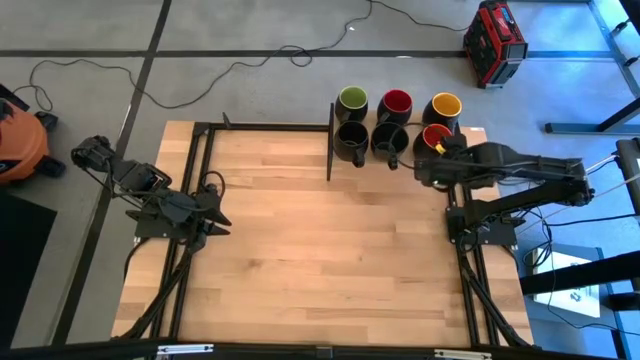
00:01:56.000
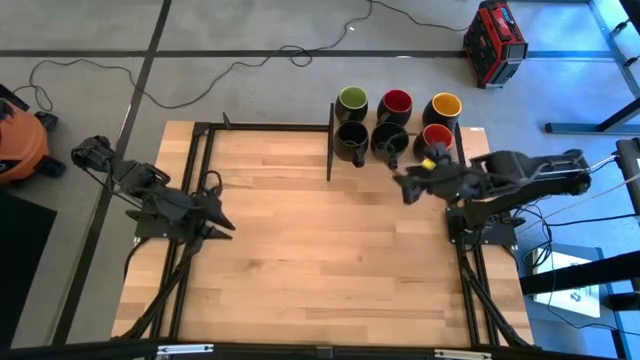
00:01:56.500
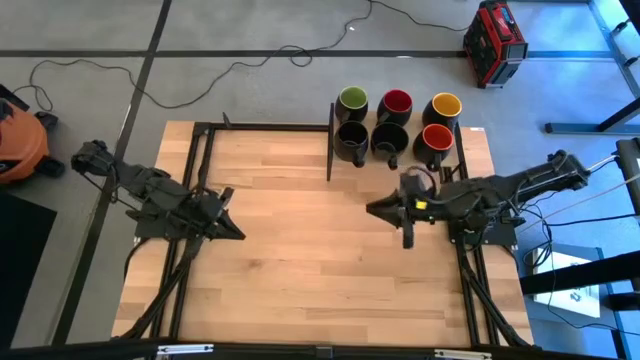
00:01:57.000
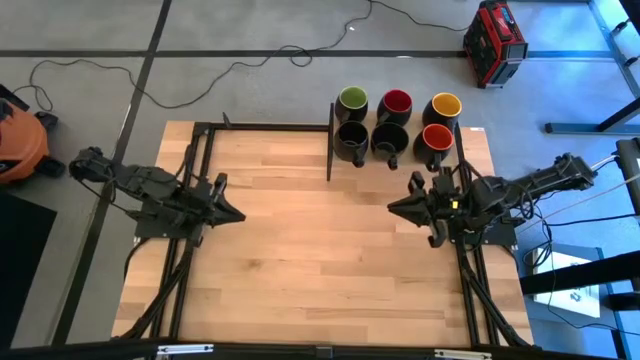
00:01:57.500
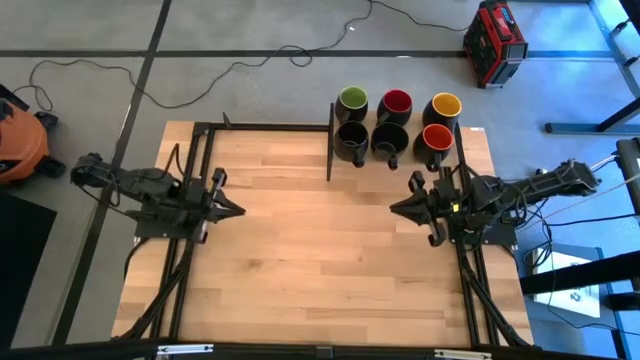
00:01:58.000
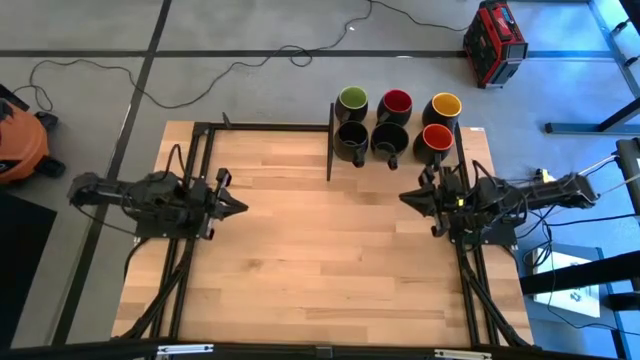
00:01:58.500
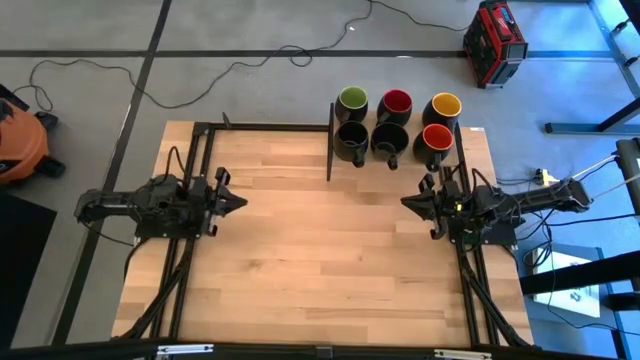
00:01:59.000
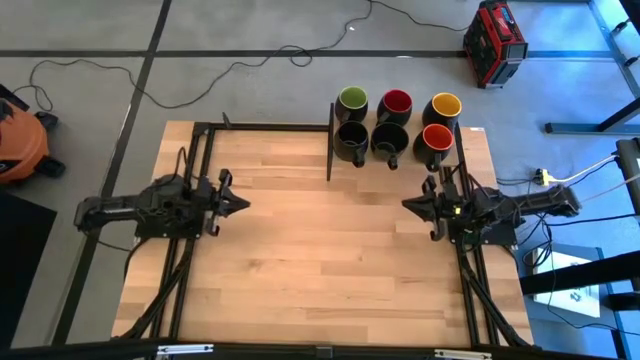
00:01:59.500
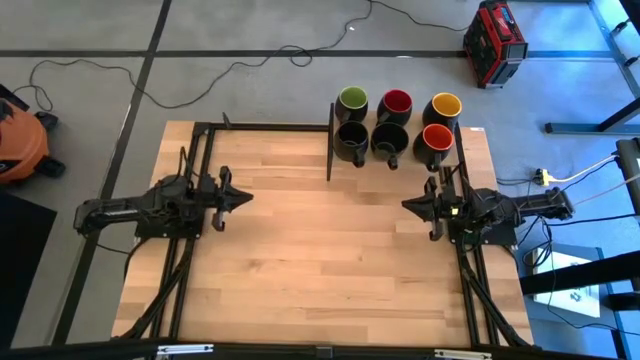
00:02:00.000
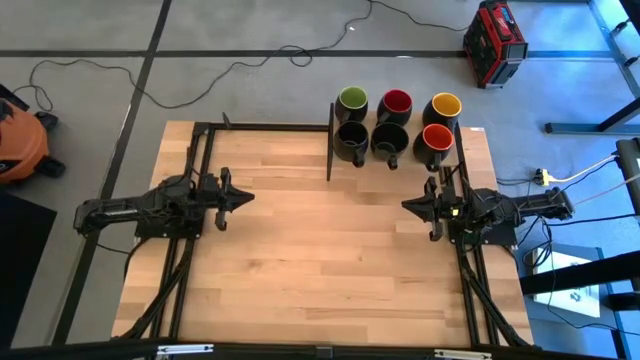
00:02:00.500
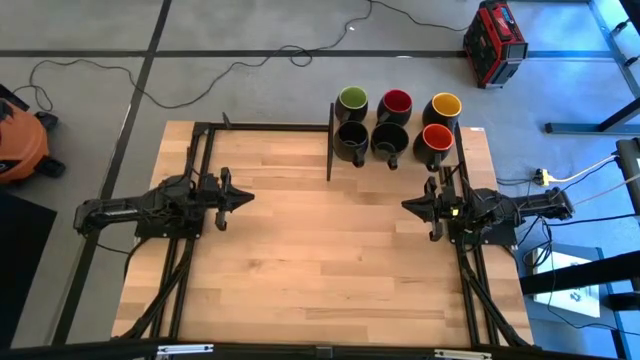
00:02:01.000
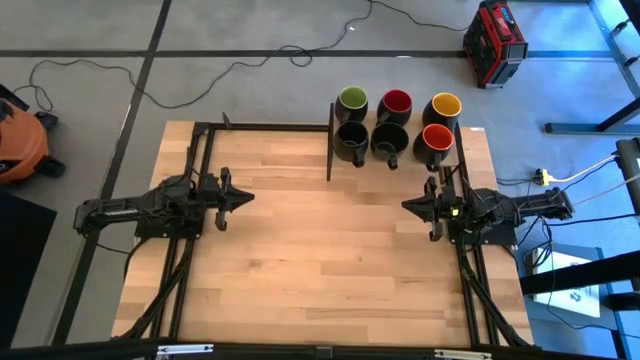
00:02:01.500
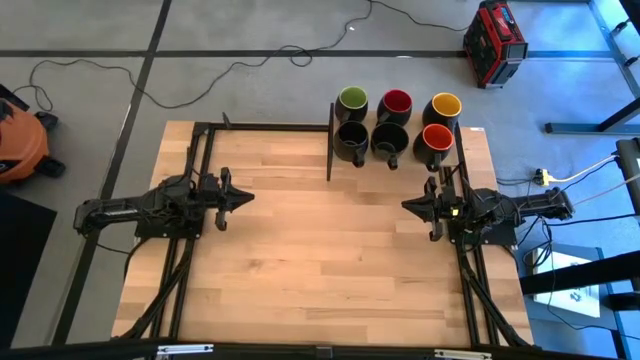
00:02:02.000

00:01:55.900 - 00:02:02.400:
Task: Place coffee mugs
Return to Home Position

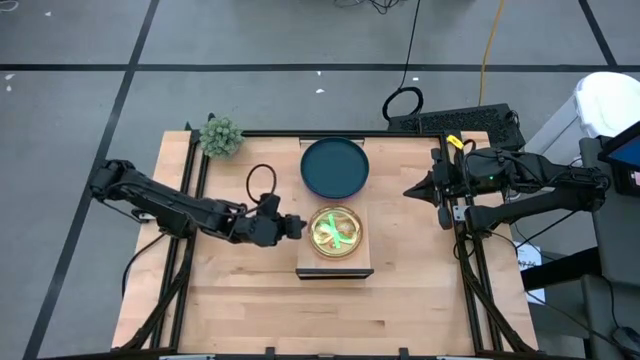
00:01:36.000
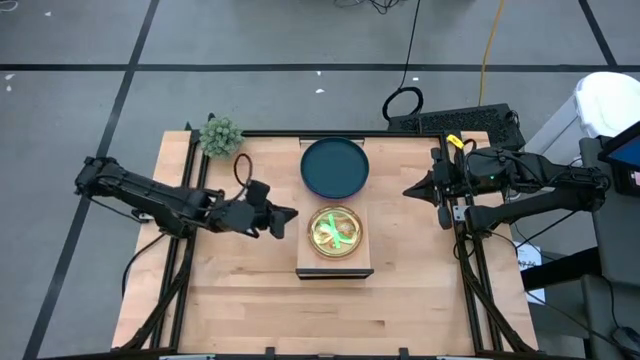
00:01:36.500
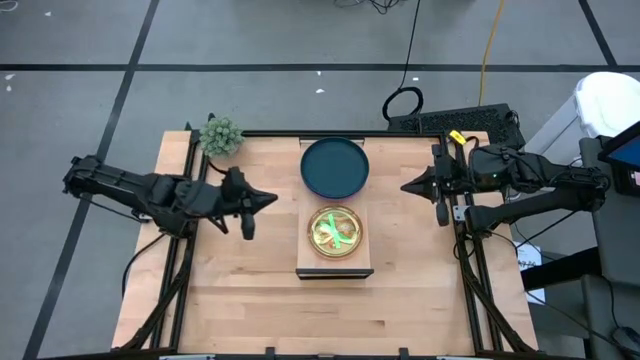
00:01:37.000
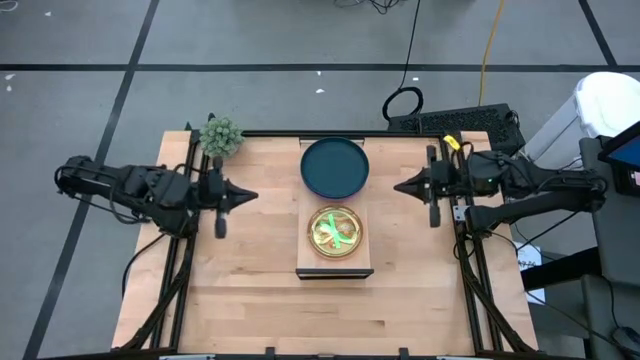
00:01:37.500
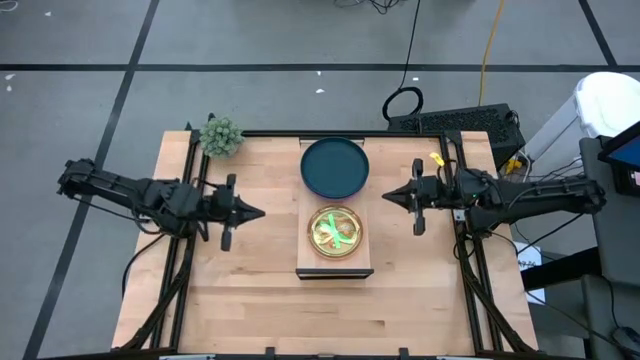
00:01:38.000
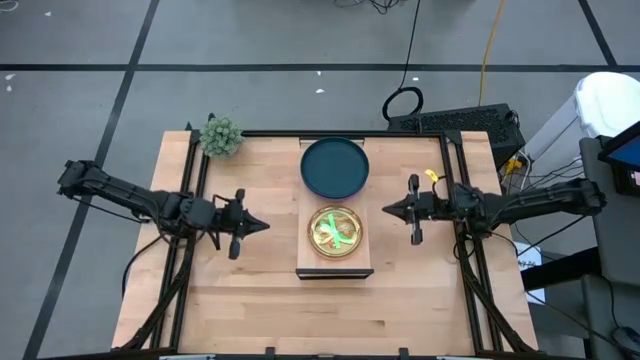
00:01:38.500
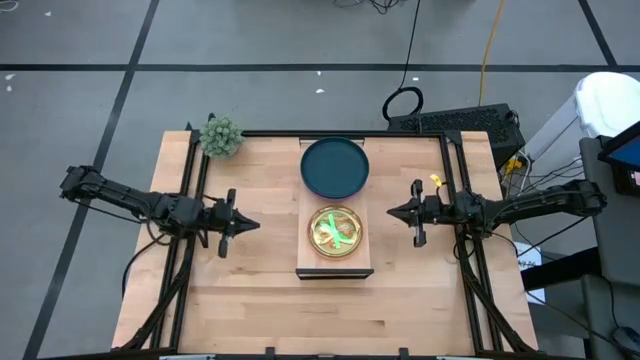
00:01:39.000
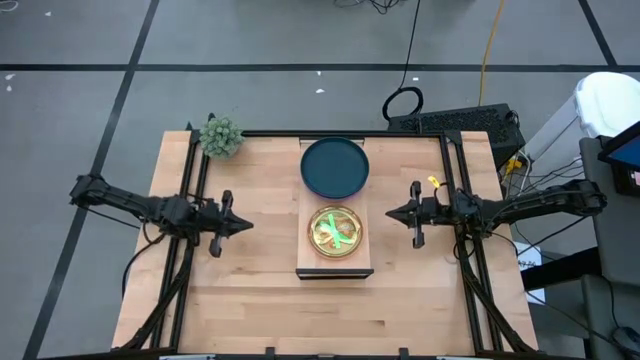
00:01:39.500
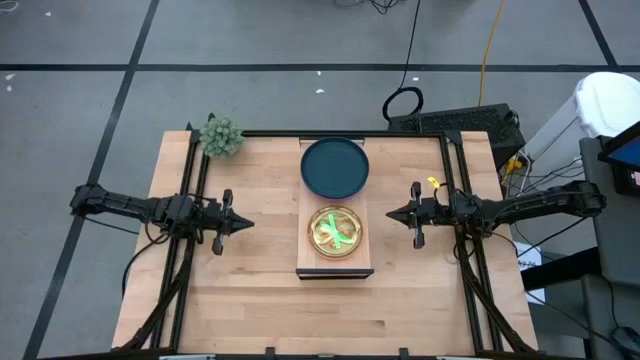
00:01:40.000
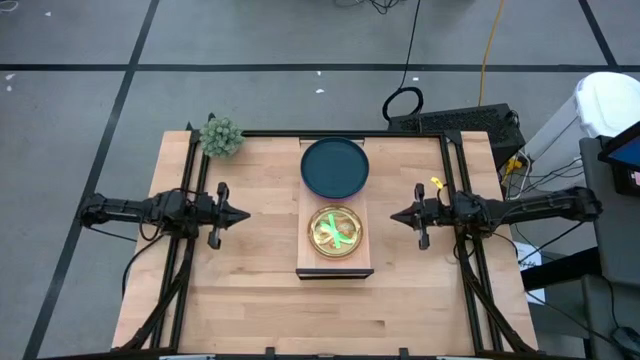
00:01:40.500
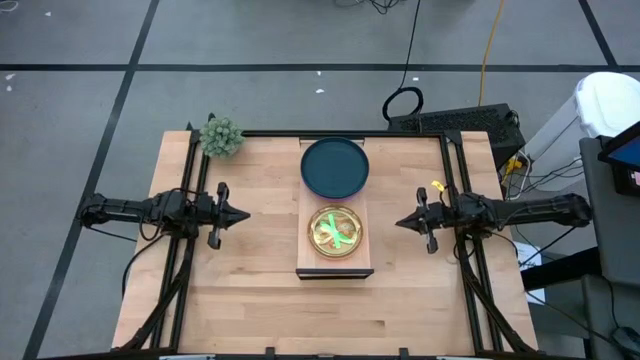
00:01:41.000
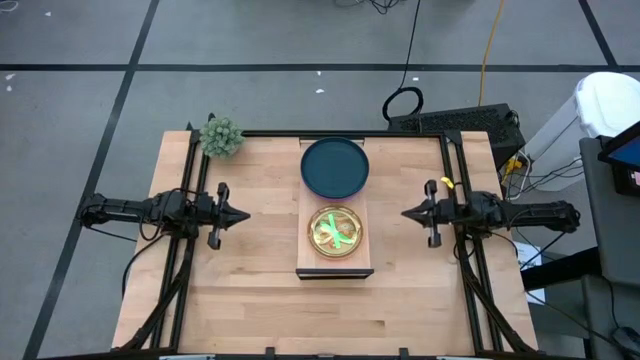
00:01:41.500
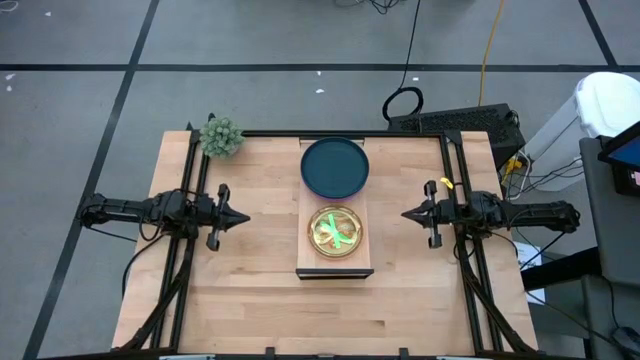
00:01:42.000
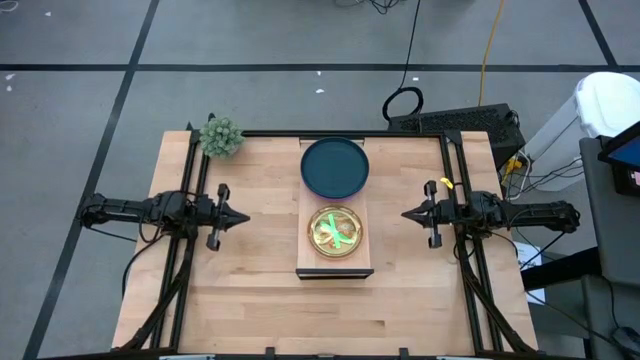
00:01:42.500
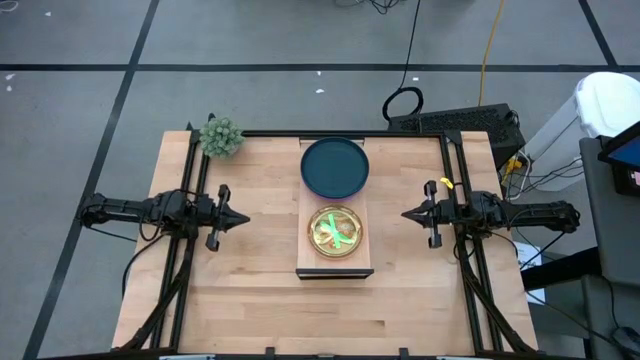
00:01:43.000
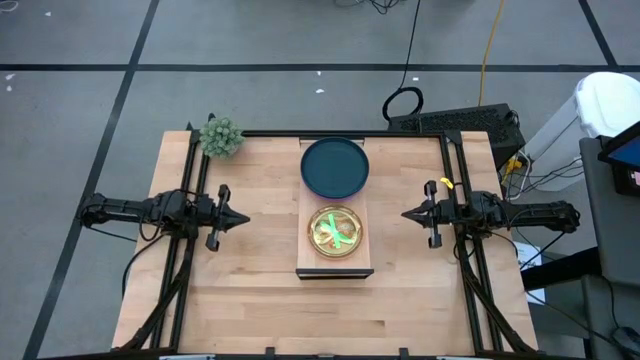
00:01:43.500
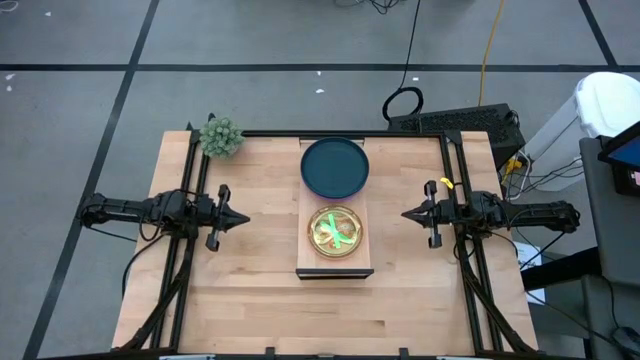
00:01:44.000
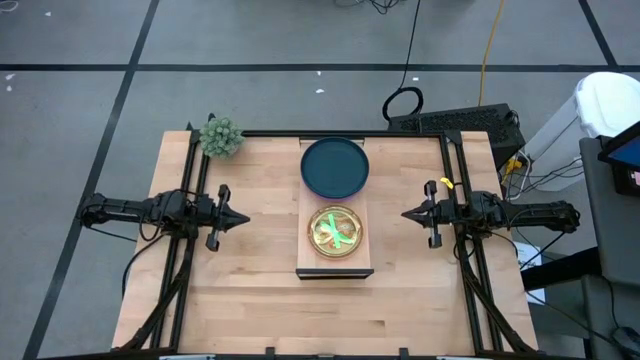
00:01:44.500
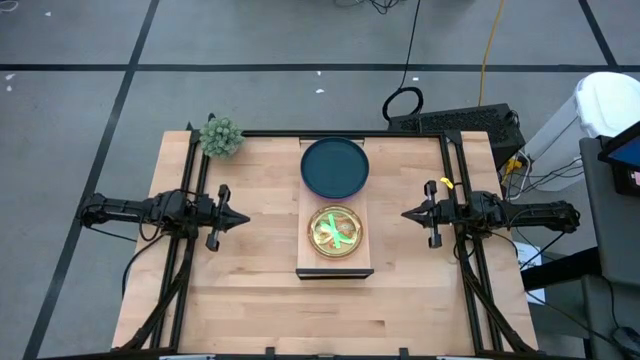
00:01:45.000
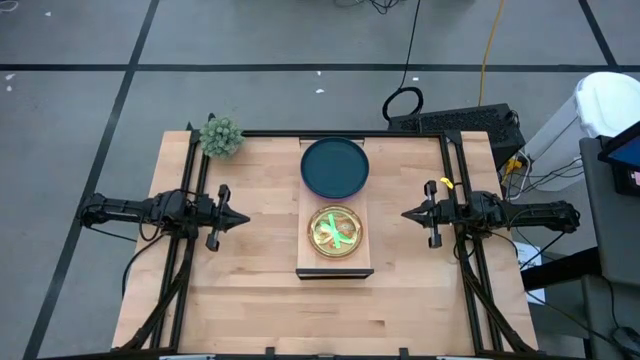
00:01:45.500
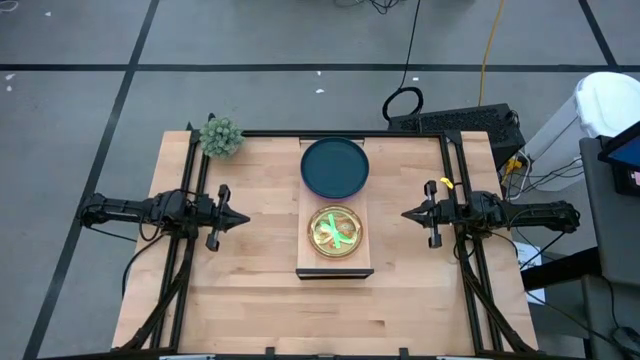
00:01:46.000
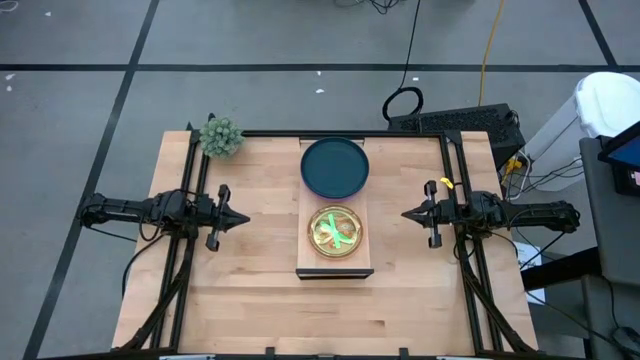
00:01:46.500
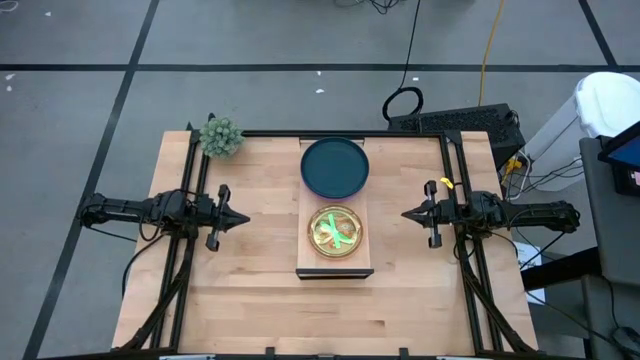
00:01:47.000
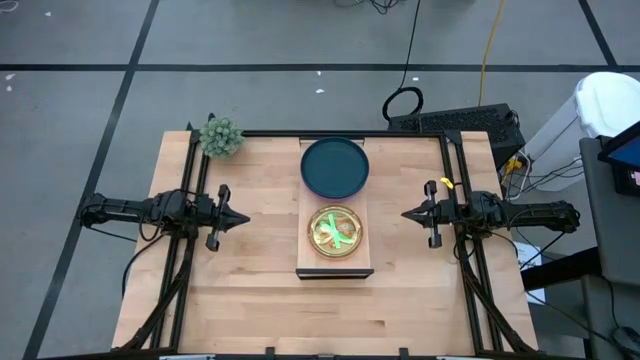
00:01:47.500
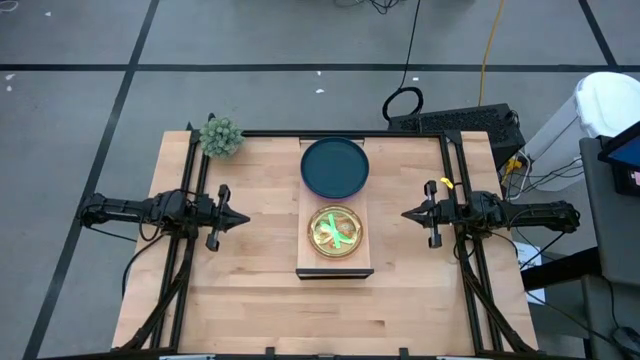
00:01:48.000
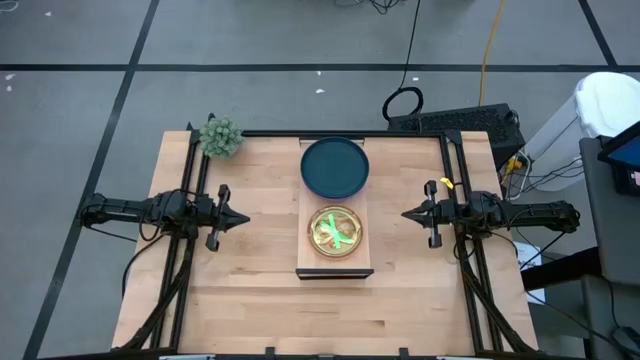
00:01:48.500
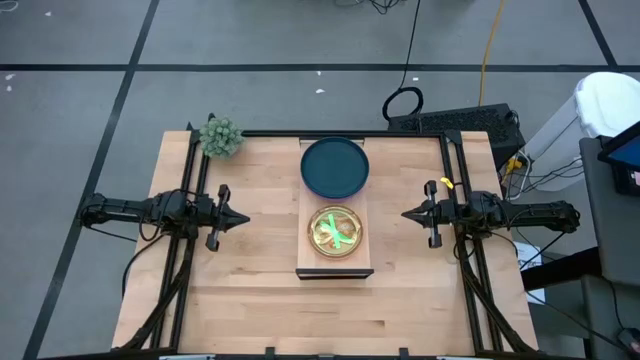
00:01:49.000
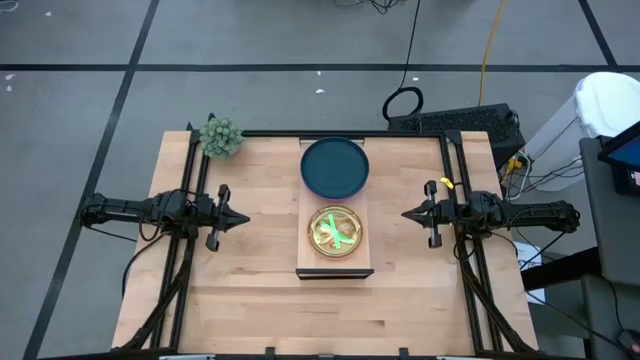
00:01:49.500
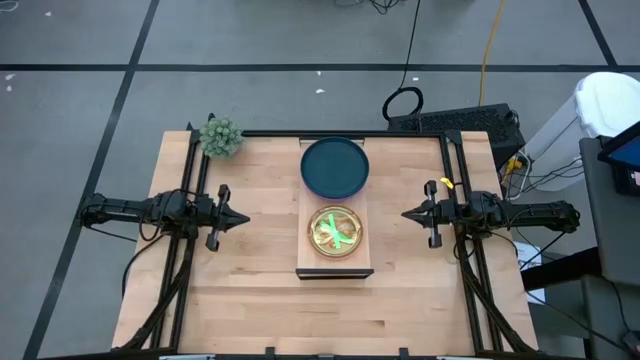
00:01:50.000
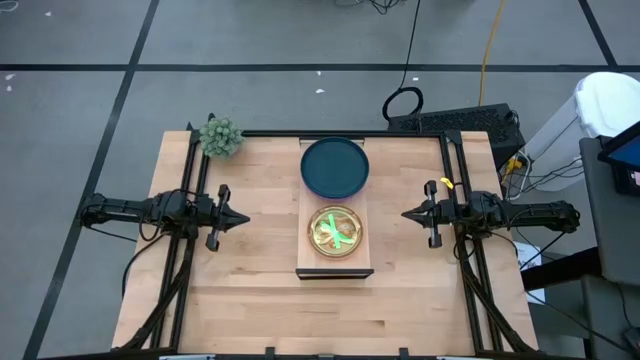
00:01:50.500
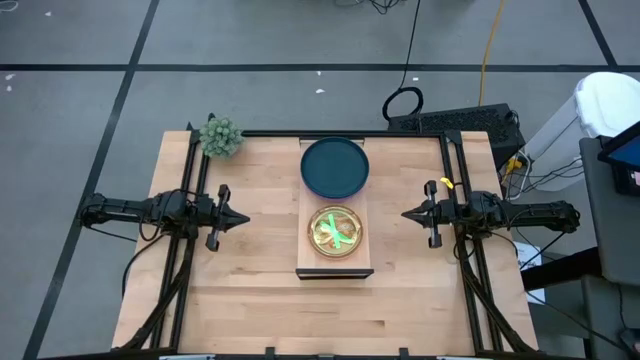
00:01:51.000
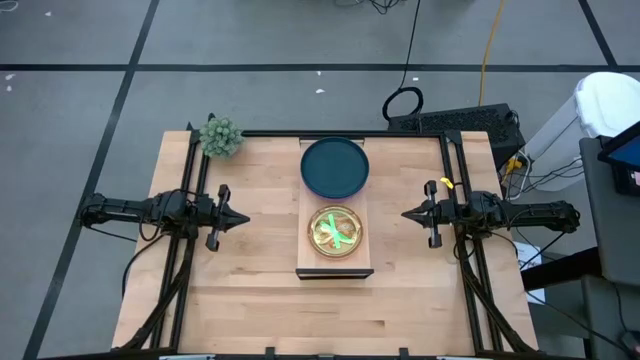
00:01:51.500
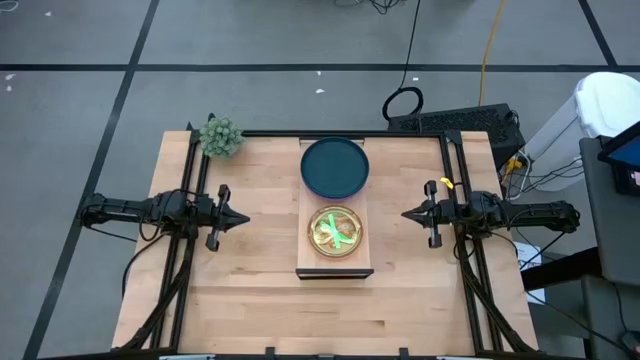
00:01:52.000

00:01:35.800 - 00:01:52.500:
Task: Place and stack plates onto a shelf
Return to Home Position
